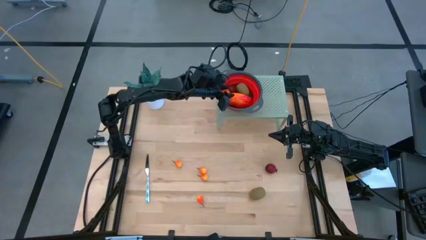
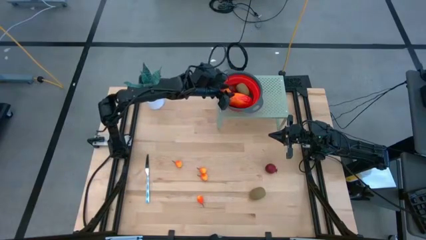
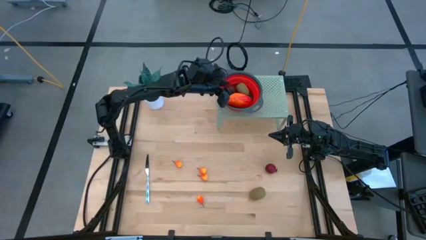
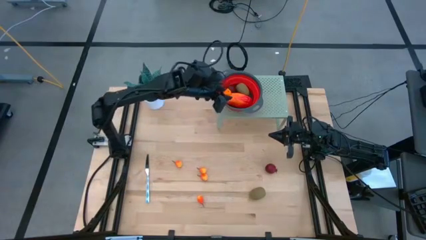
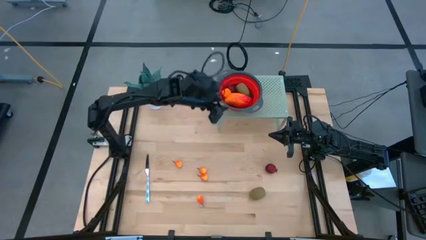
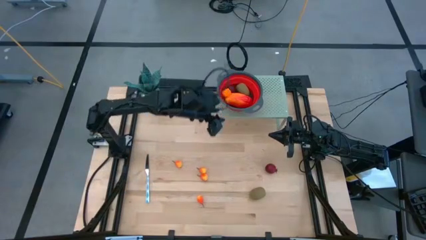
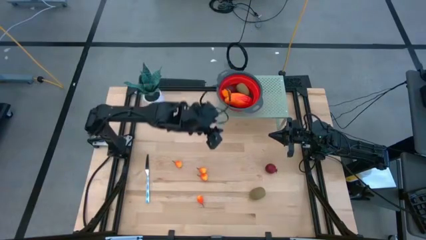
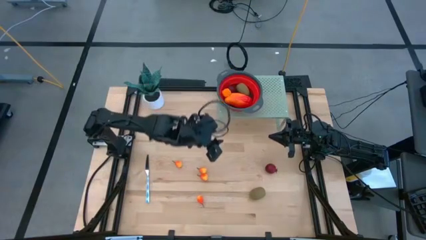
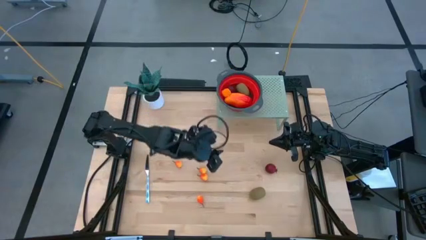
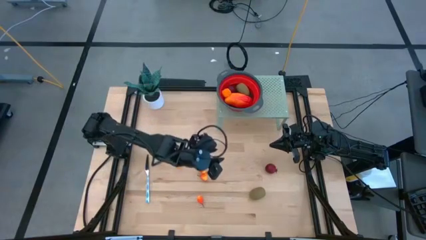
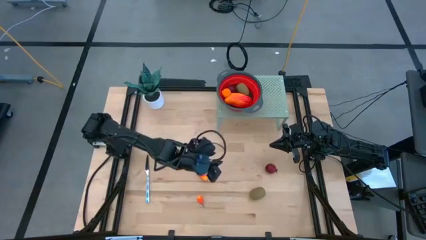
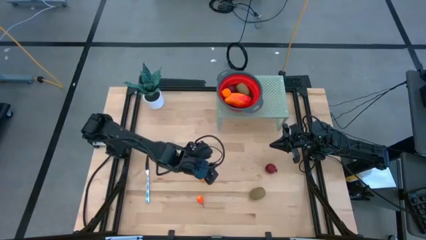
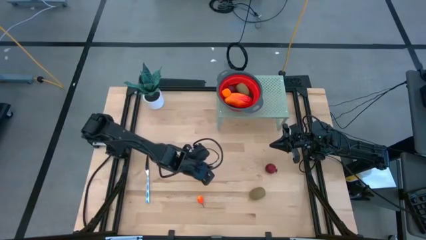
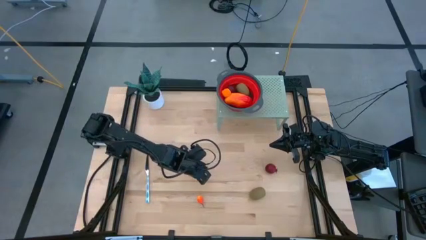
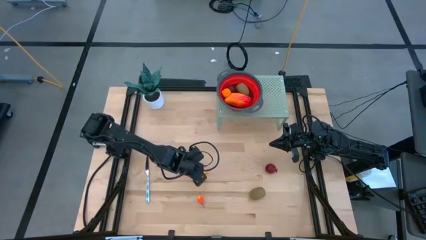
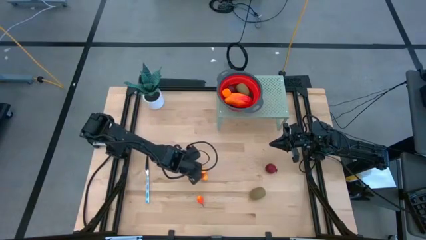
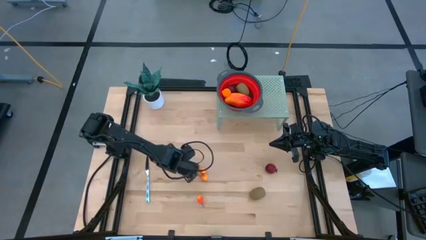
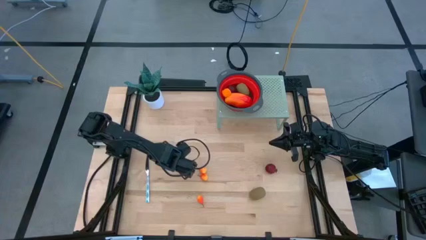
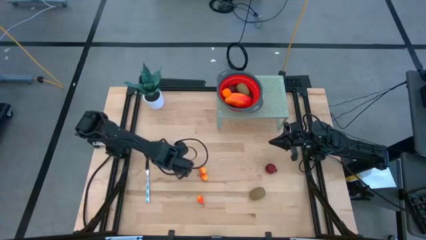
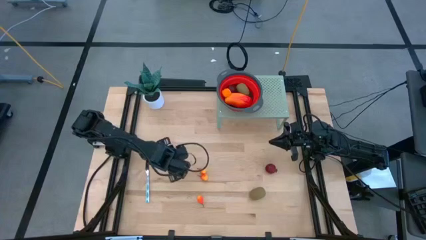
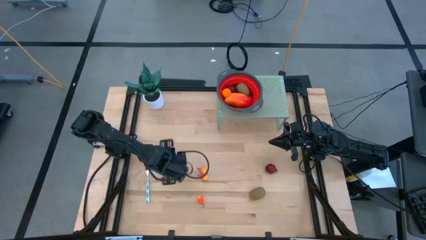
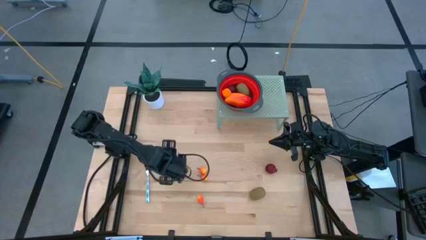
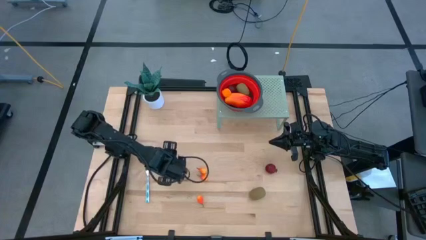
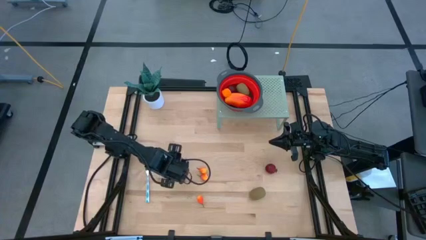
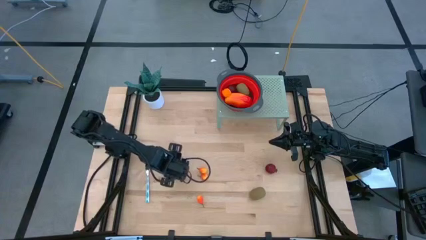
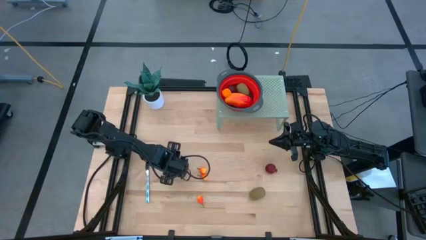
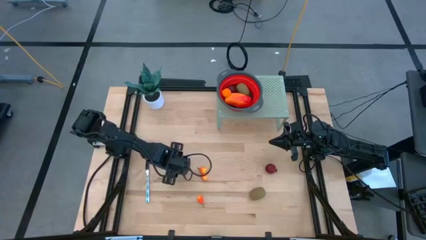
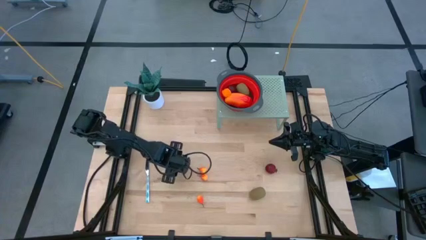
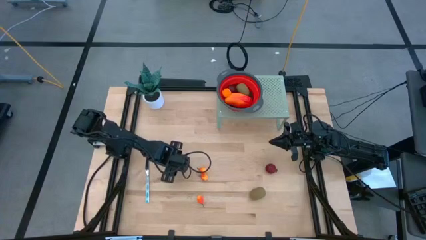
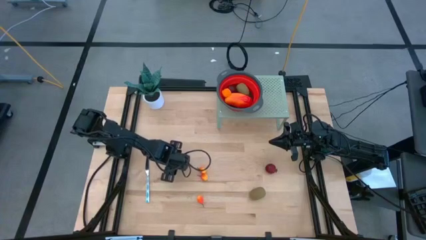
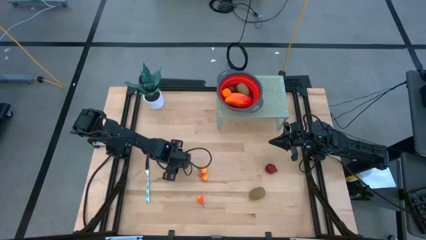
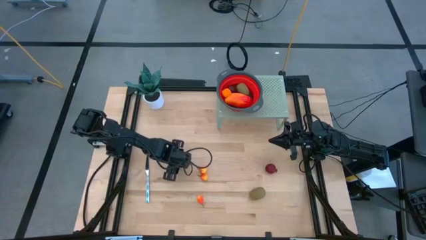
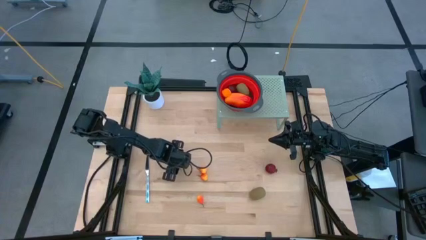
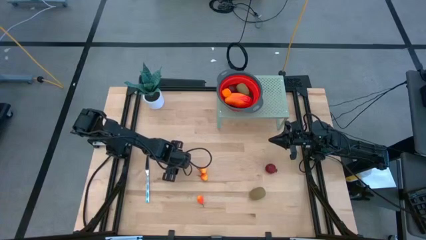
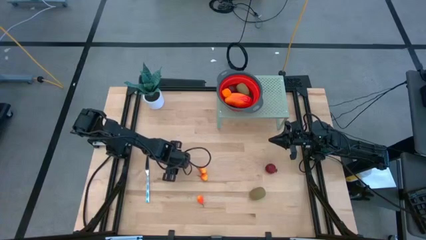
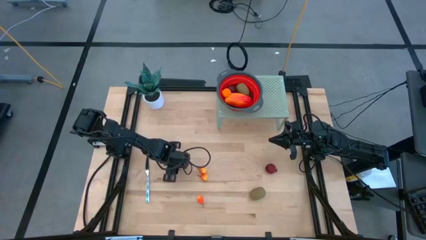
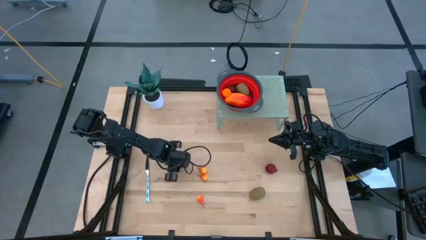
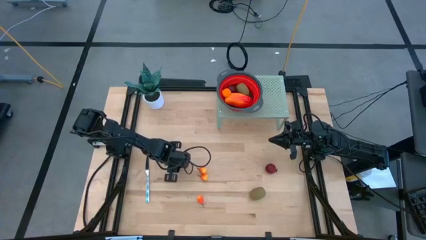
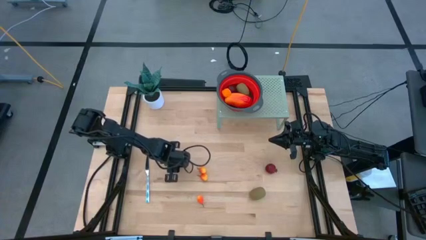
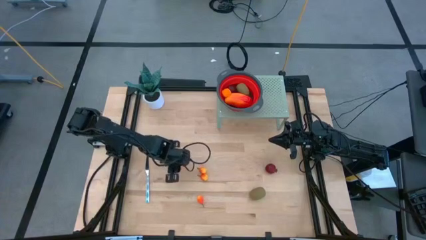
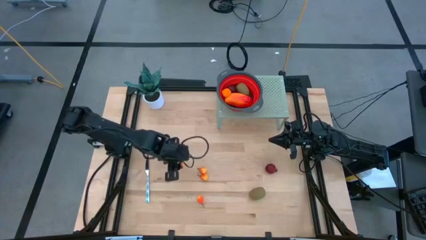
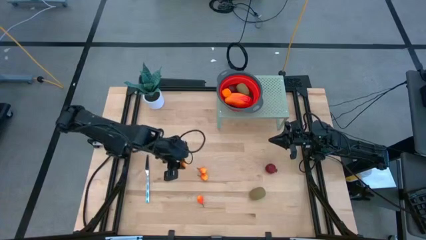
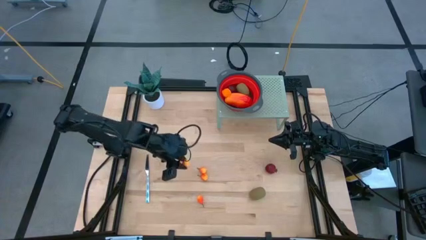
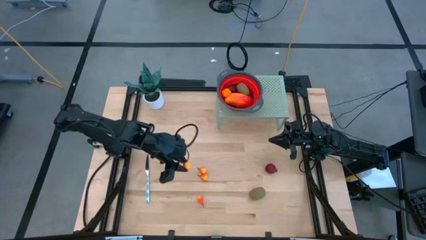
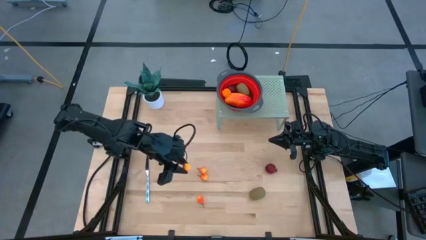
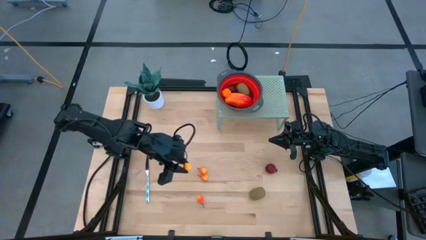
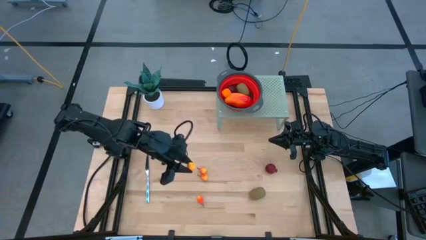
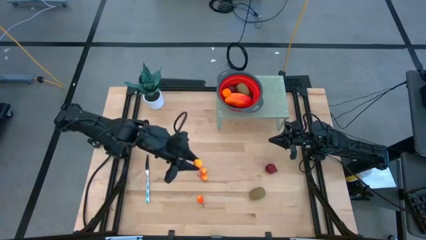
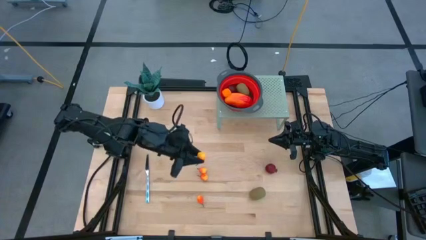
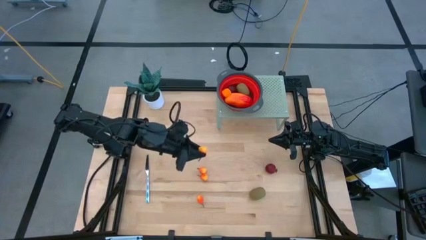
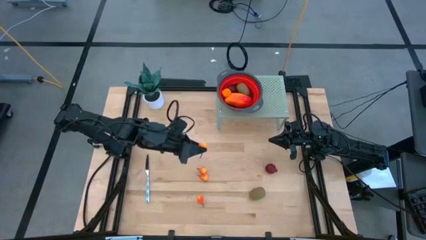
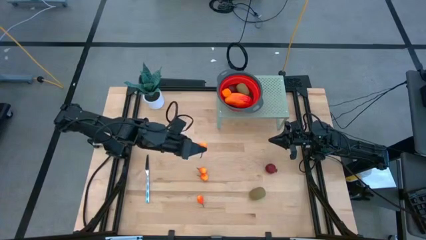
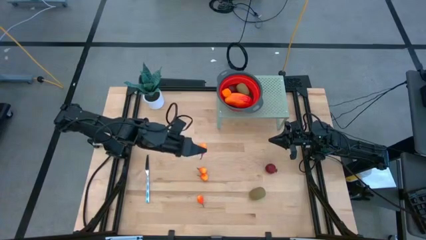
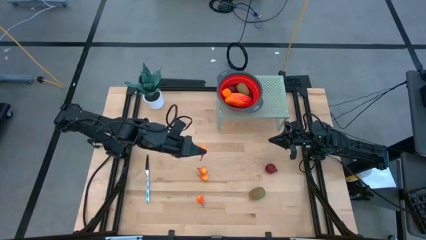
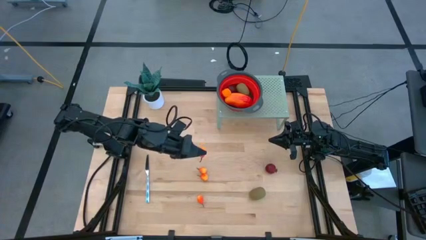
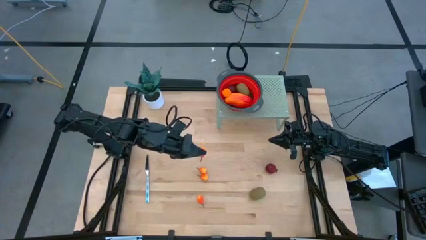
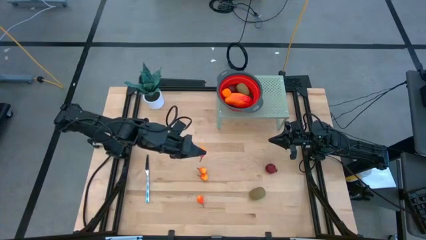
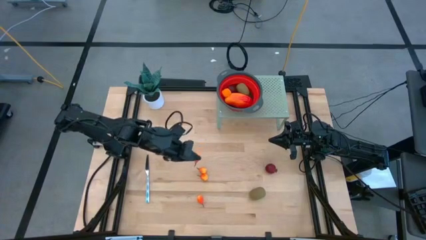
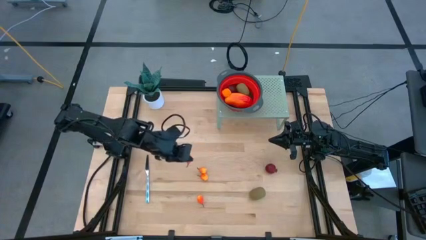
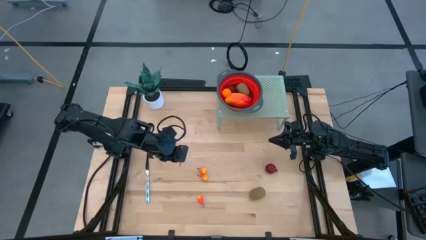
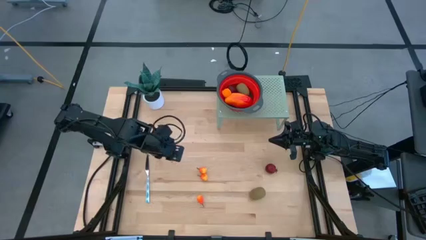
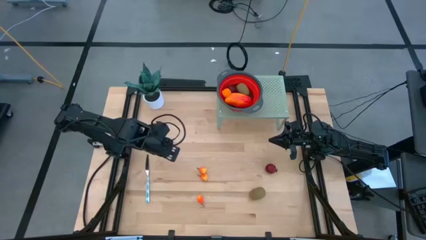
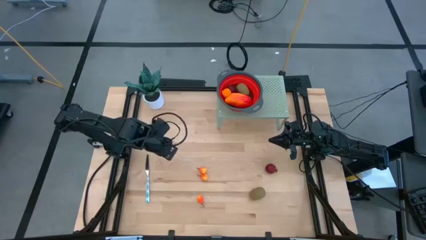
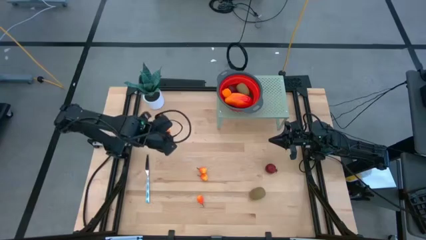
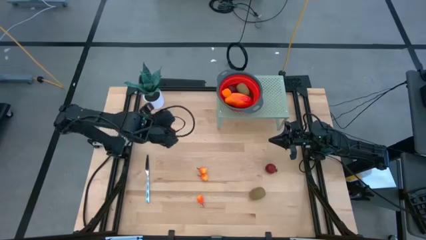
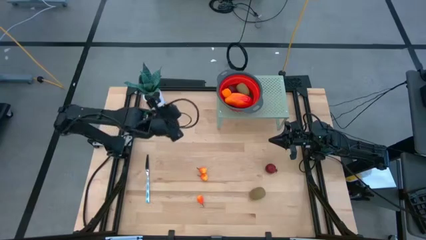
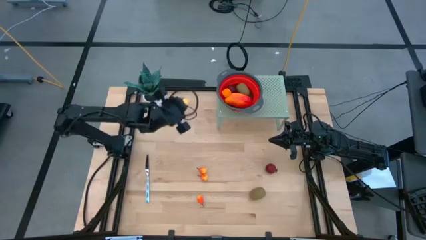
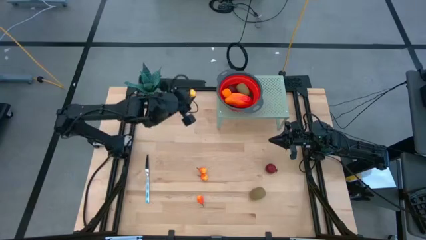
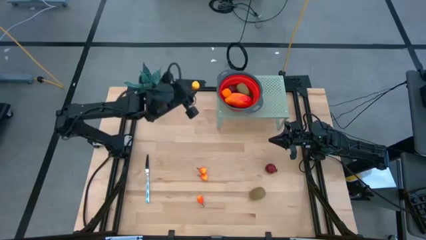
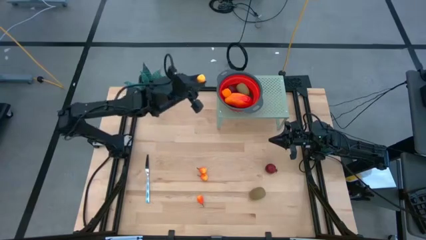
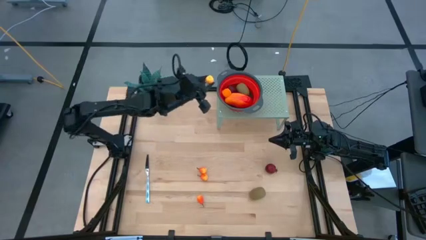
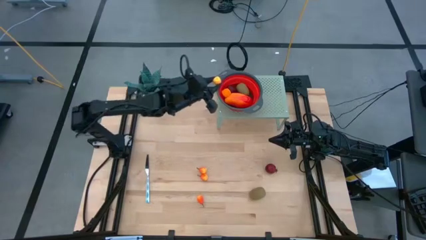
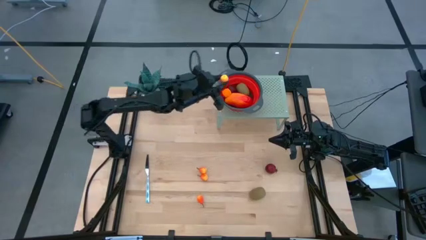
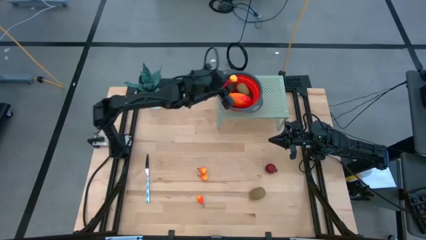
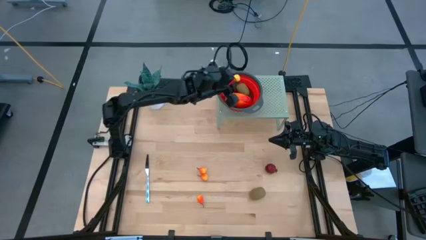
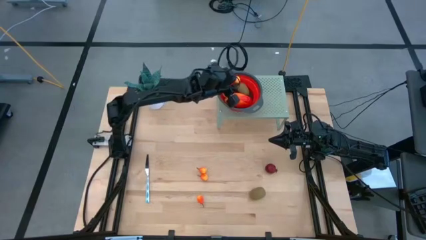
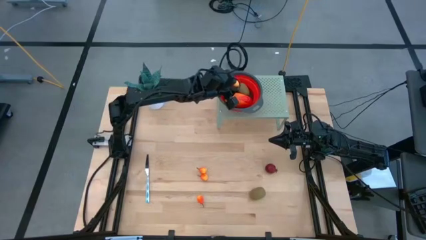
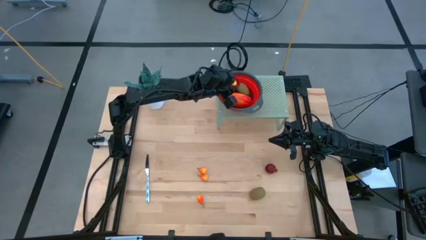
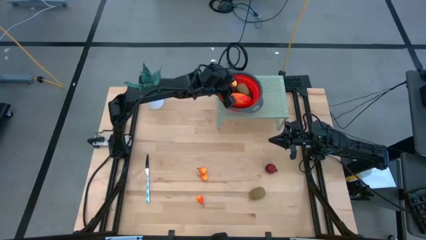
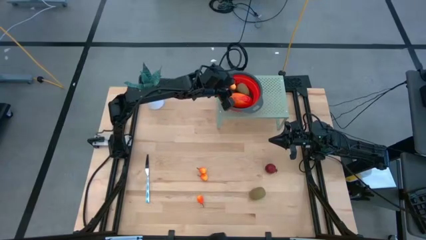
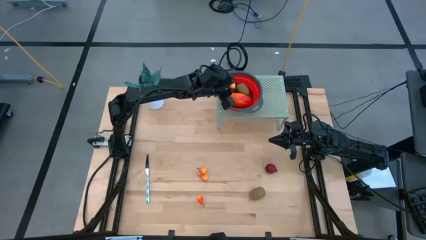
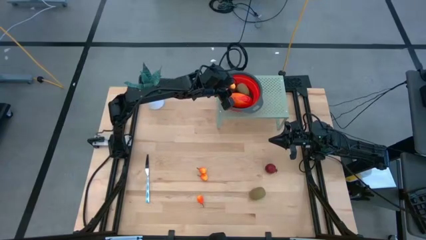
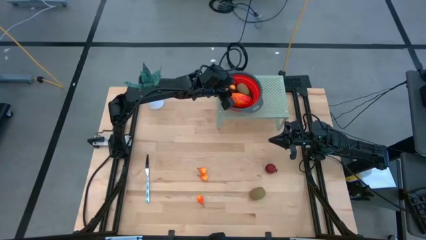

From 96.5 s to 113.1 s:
Task: Pick & Place Fruit
Put the yellow peach into the red strainer bowl on the shelf
